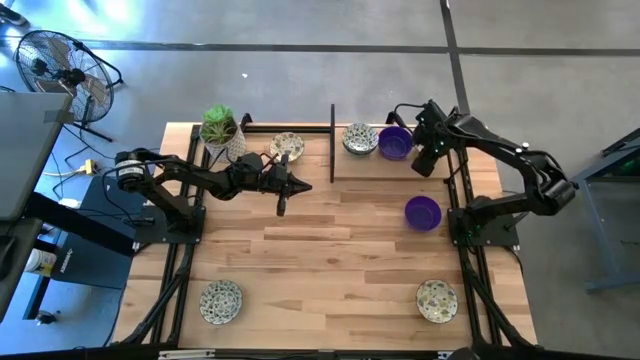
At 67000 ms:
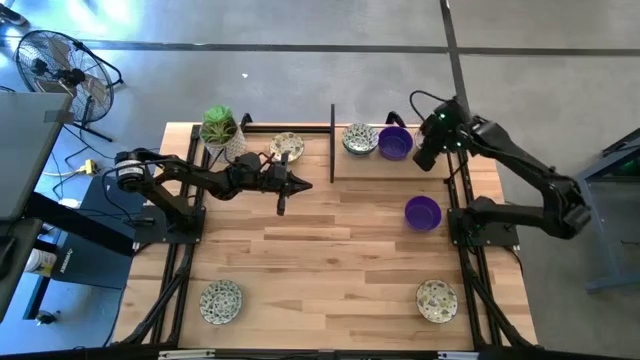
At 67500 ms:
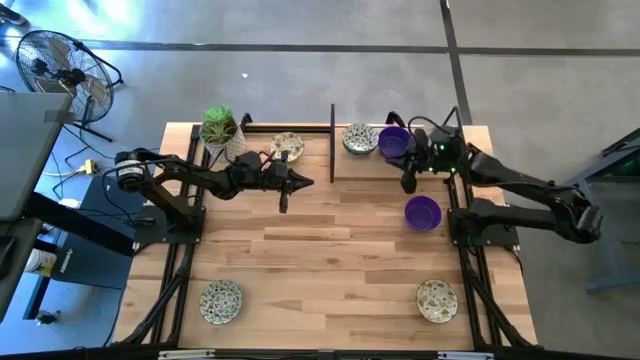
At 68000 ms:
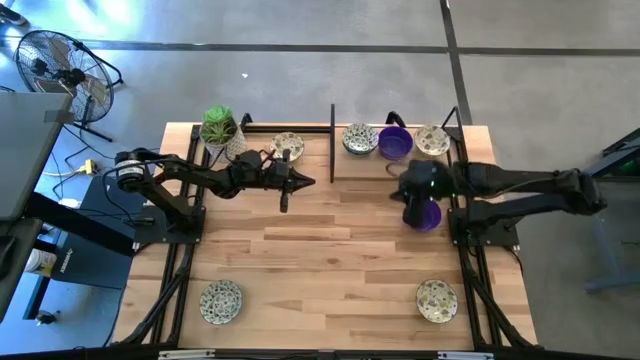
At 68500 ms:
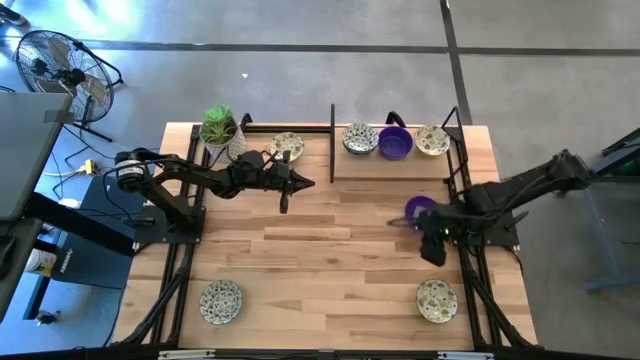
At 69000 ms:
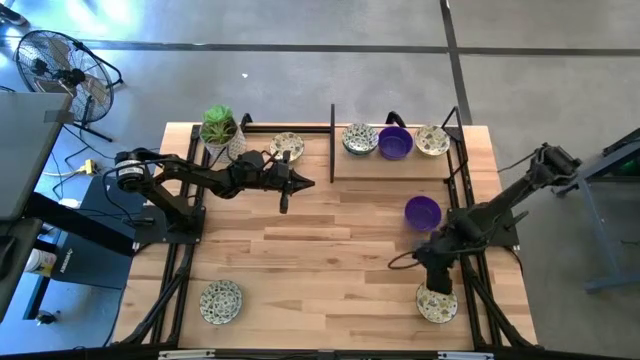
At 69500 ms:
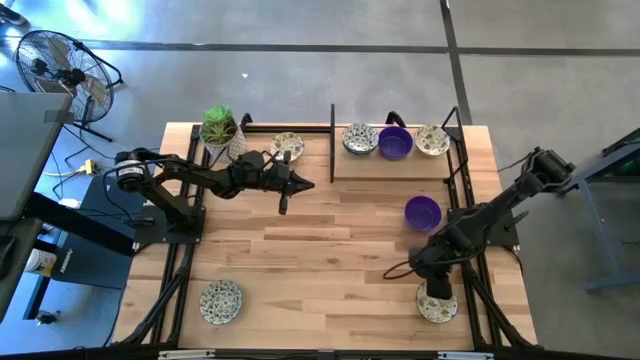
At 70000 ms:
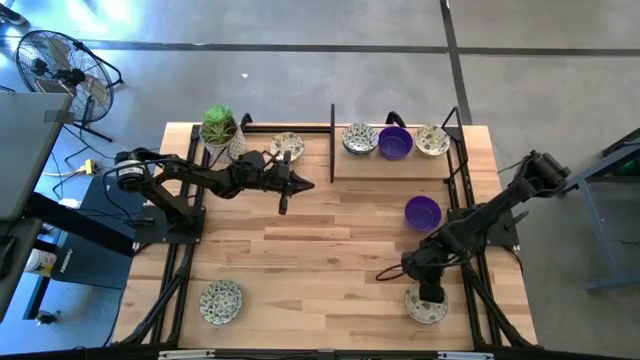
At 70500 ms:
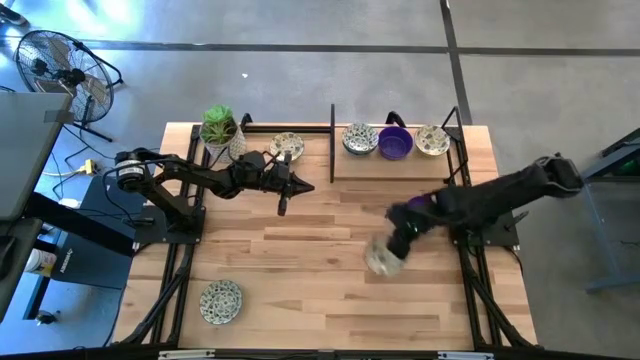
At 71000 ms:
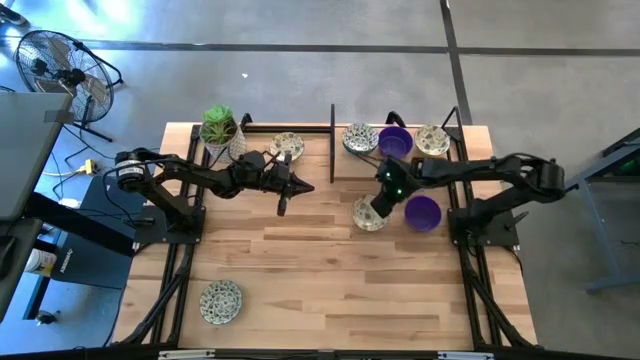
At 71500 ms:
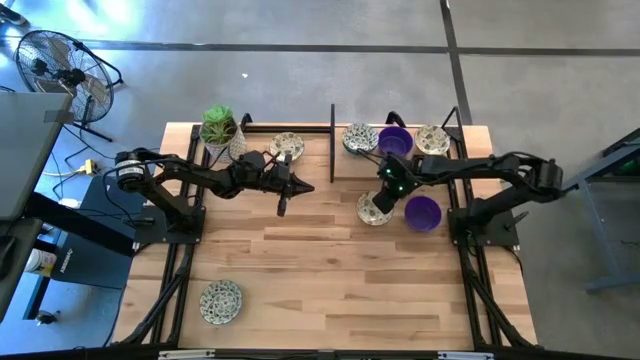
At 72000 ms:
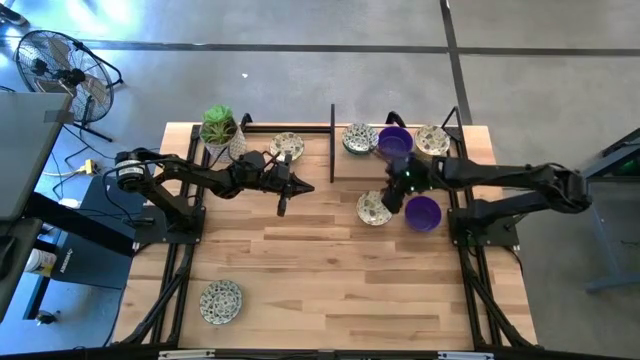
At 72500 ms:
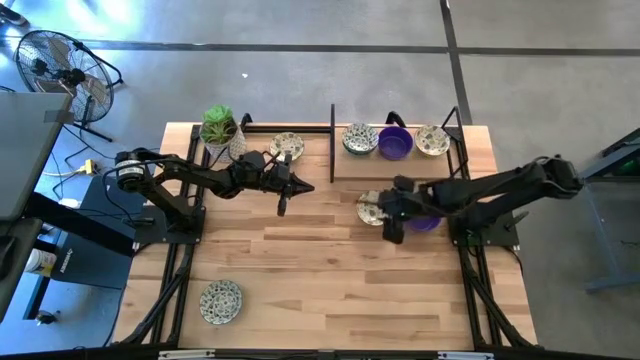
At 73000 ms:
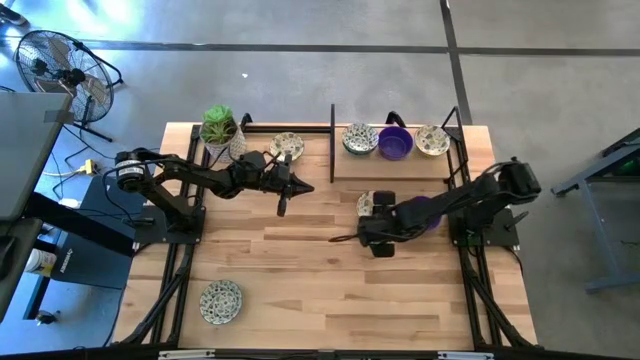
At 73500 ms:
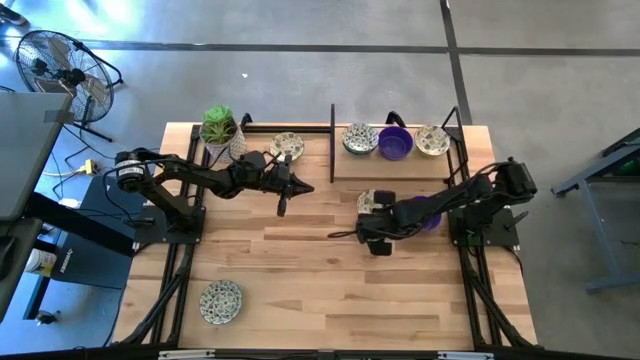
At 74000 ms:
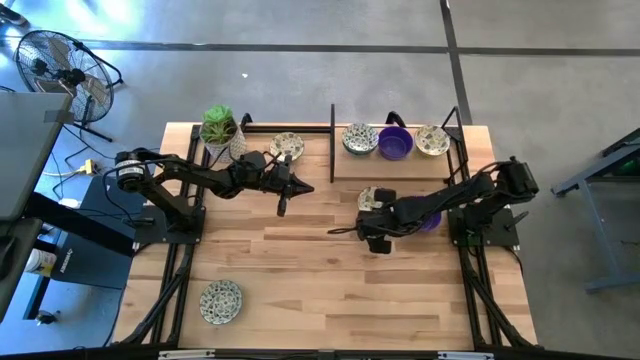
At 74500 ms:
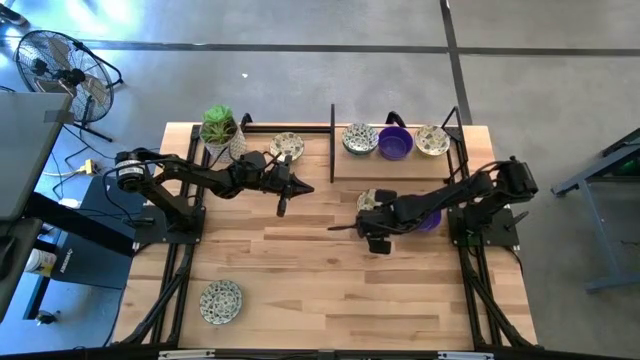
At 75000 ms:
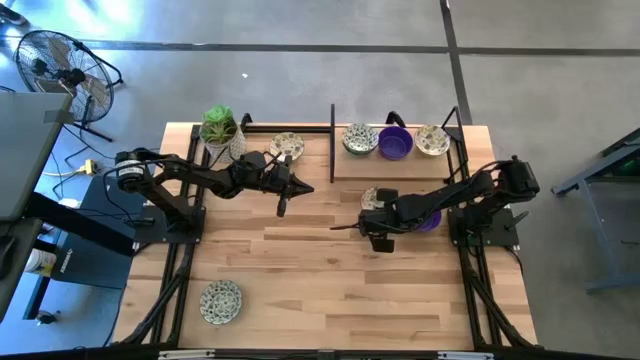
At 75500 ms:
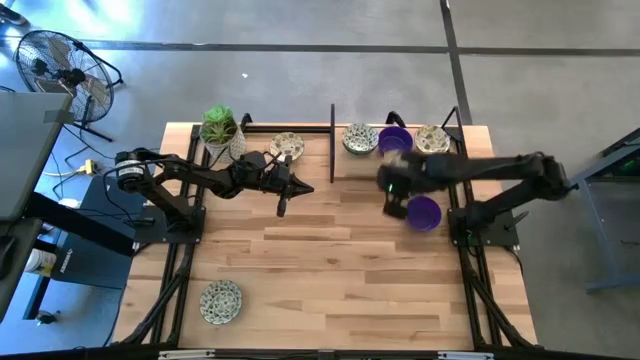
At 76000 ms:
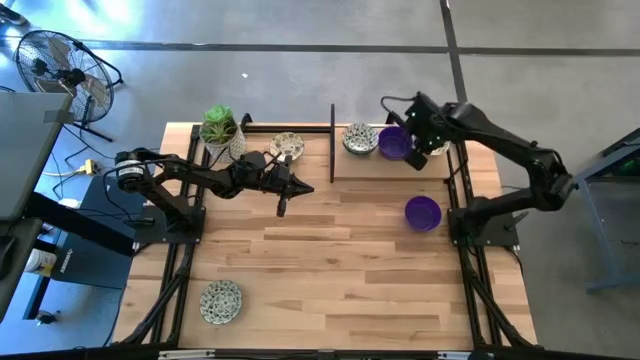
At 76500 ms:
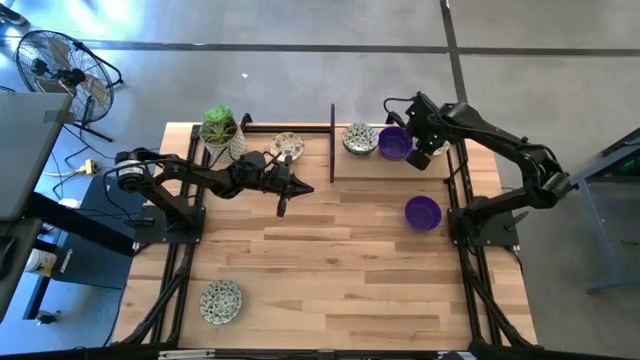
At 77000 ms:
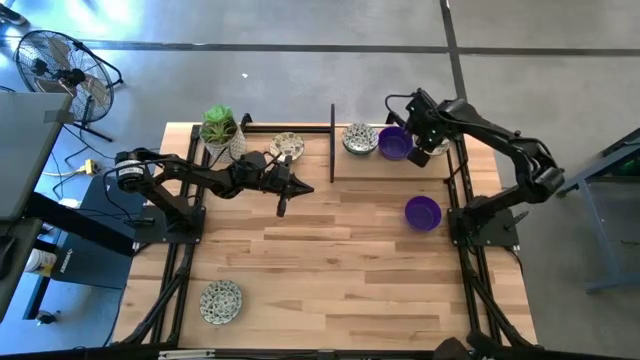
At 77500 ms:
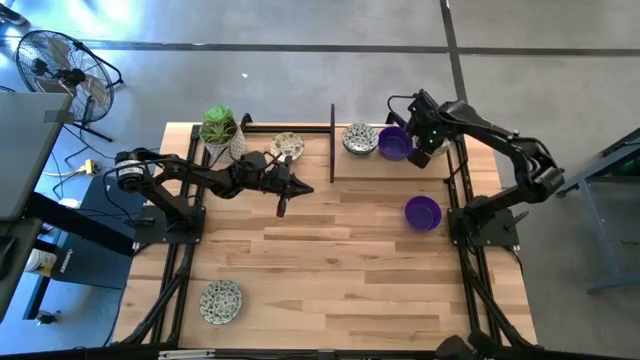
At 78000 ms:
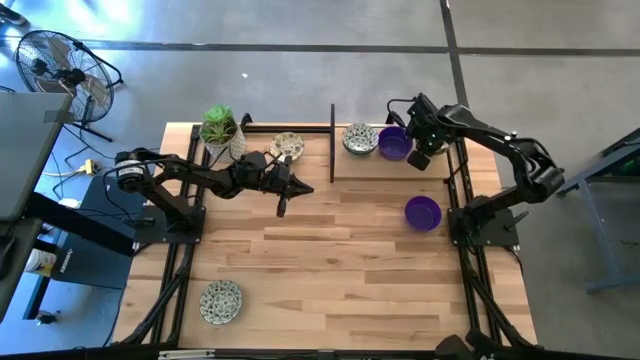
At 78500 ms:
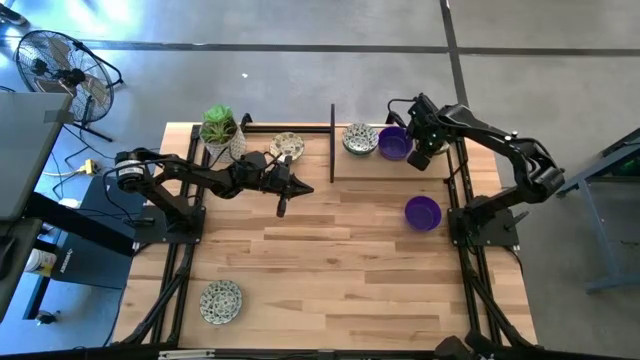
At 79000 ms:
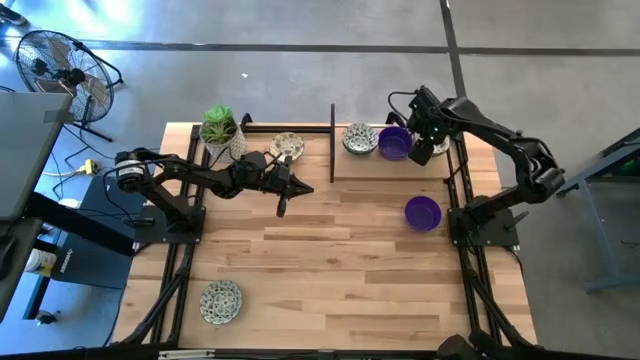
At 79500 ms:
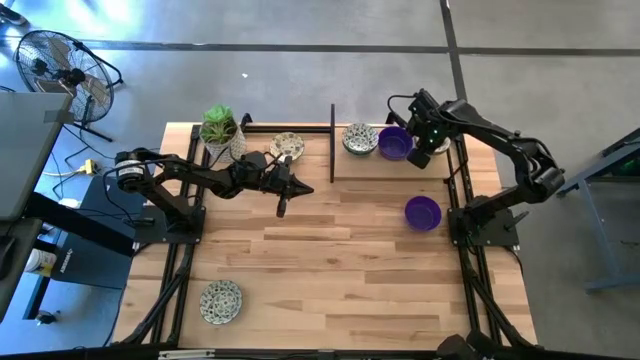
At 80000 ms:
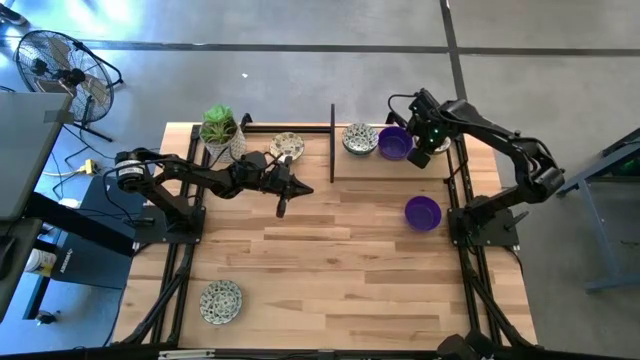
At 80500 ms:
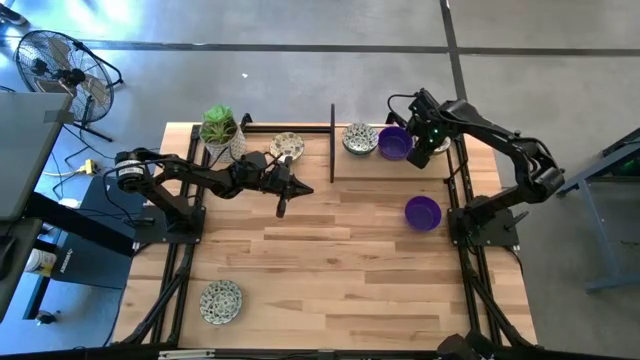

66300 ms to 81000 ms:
Task: Pick & Place Mini bowls
Stack the bottom yellow bowl on top of the yellow bowl on the shelf

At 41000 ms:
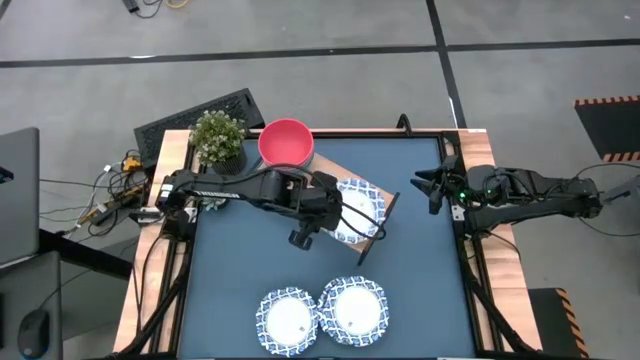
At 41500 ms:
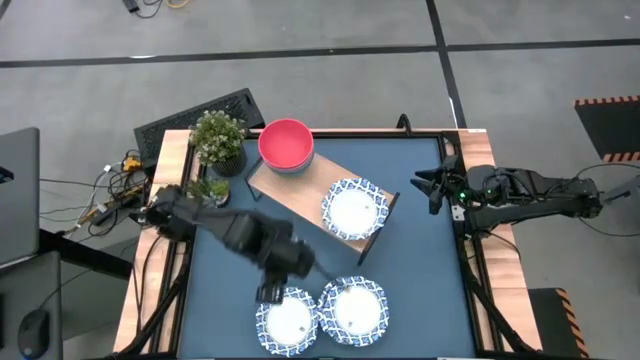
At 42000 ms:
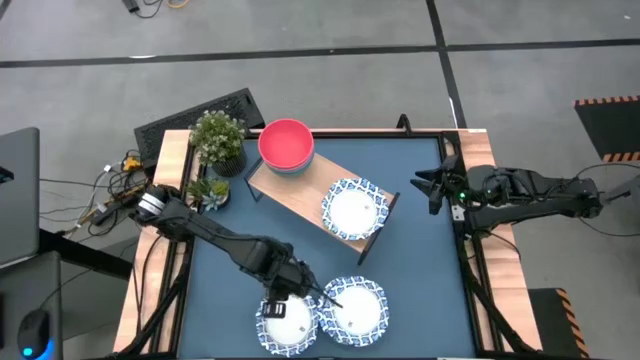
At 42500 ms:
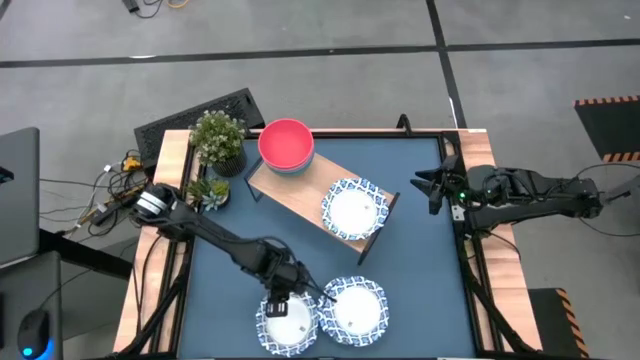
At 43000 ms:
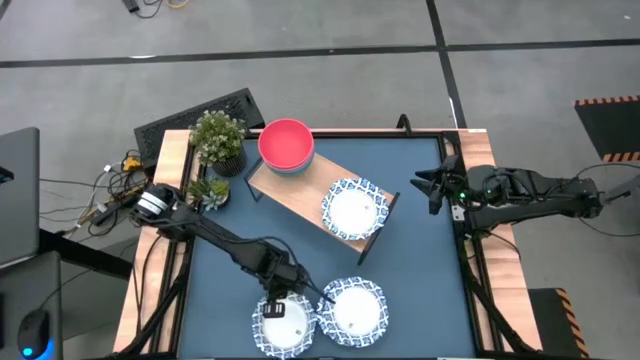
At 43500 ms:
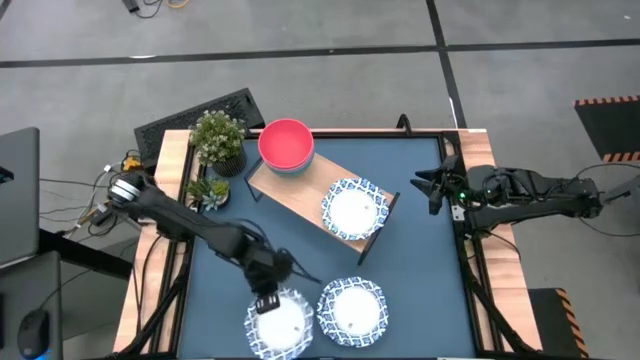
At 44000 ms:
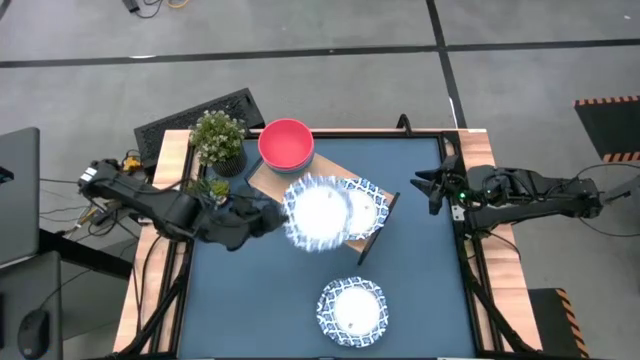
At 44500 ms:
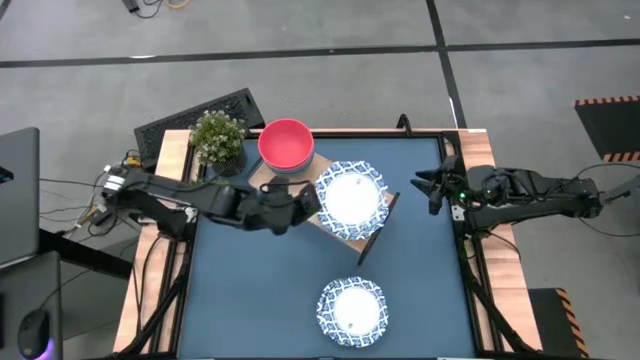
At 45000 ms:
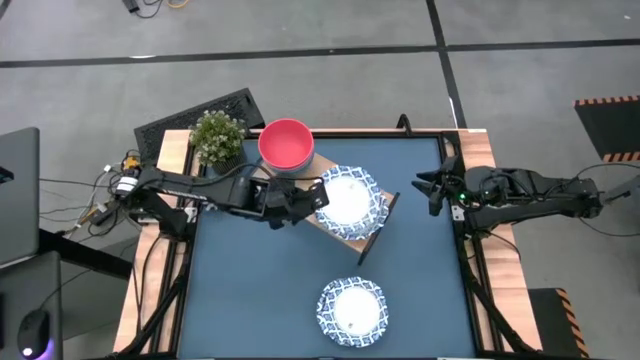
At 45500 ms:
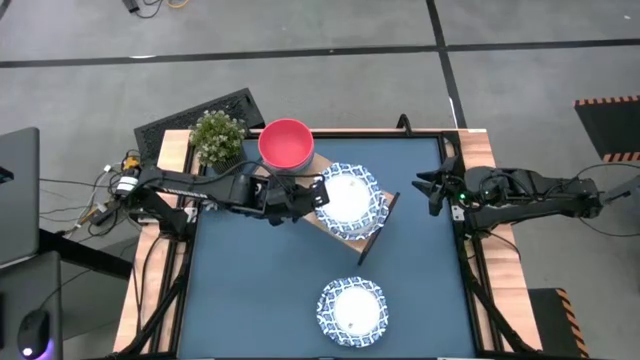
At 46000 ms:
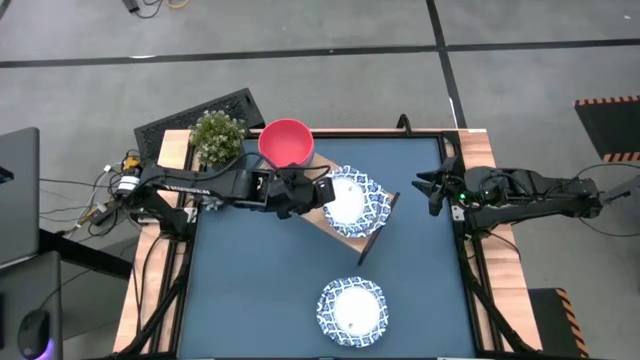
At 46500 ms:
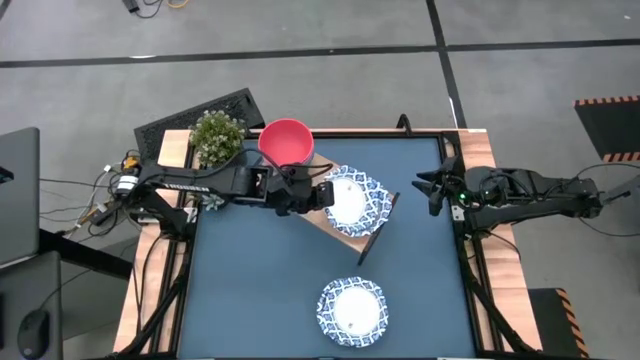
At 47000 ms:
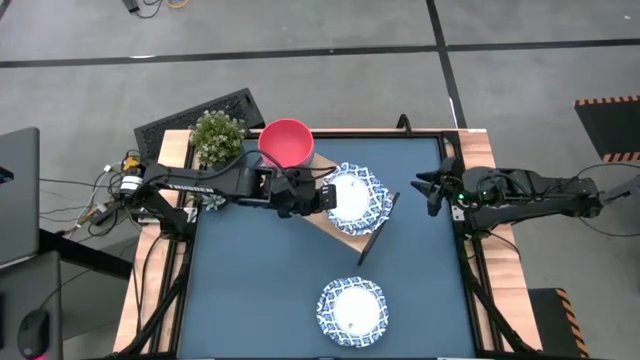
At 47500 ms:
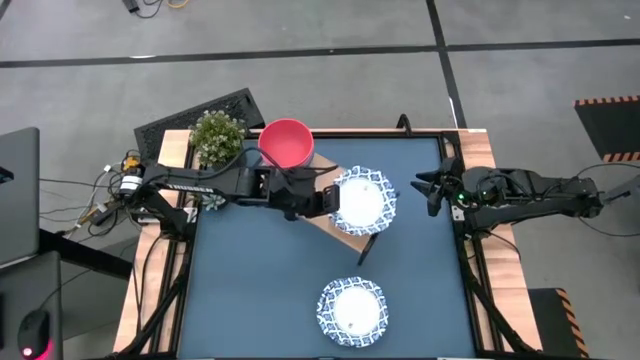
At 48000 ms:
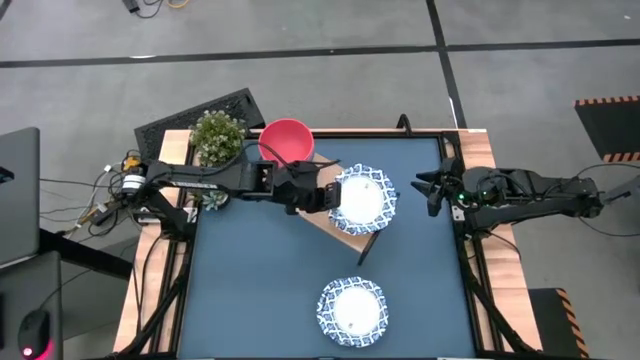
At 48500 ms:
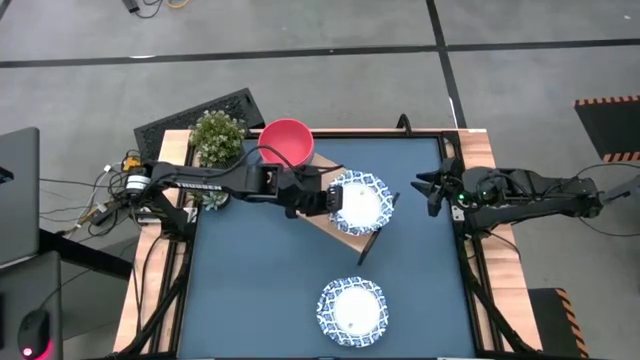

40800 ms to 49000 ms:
Task: Place and stack bowls onto a shelf
Stack the left white bowl on top of the white bowl on the shelf
